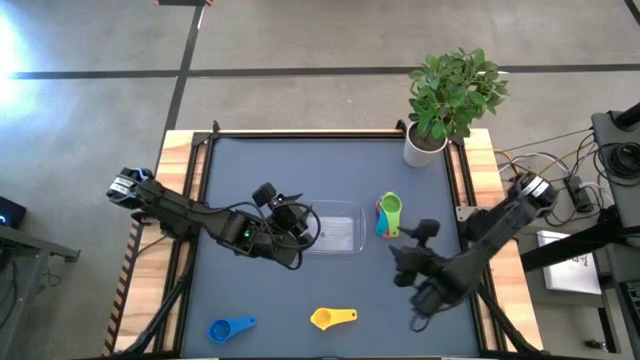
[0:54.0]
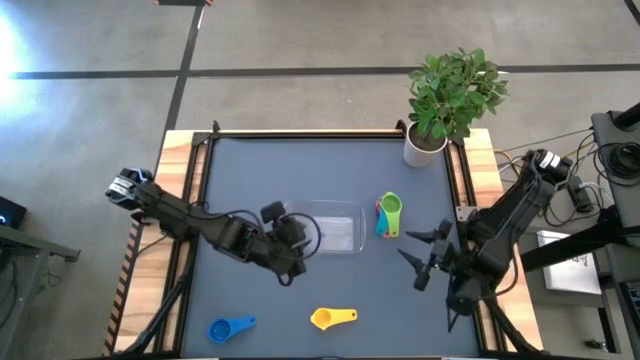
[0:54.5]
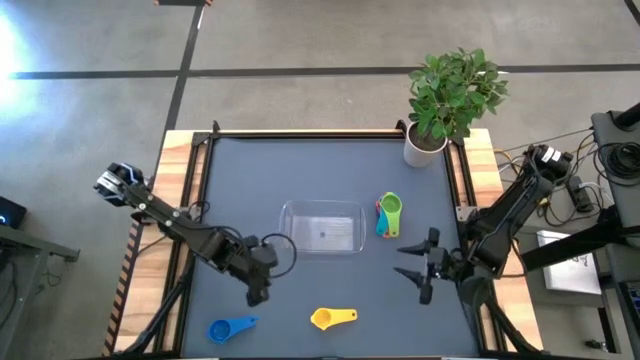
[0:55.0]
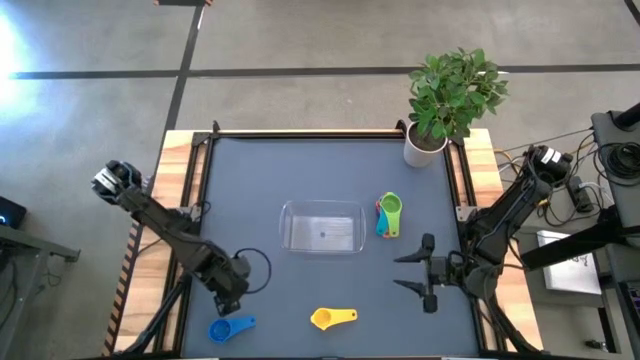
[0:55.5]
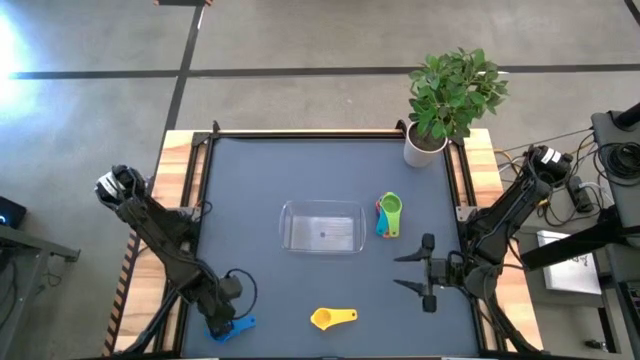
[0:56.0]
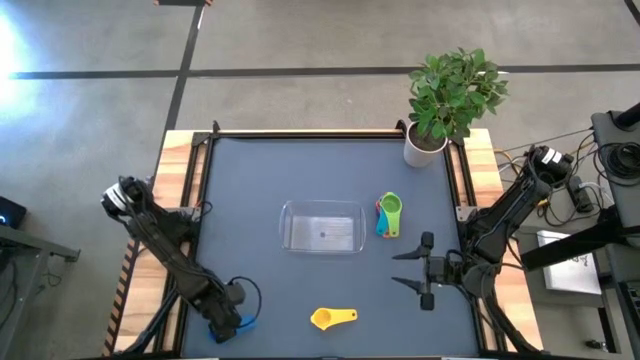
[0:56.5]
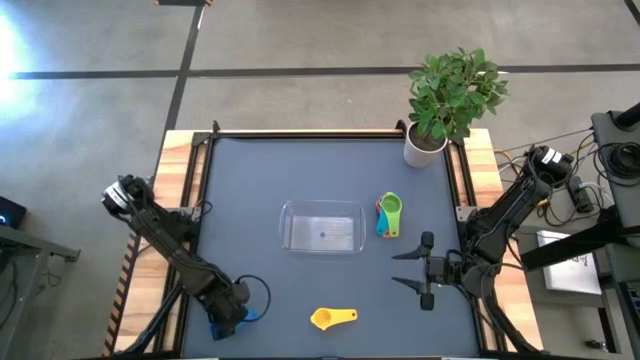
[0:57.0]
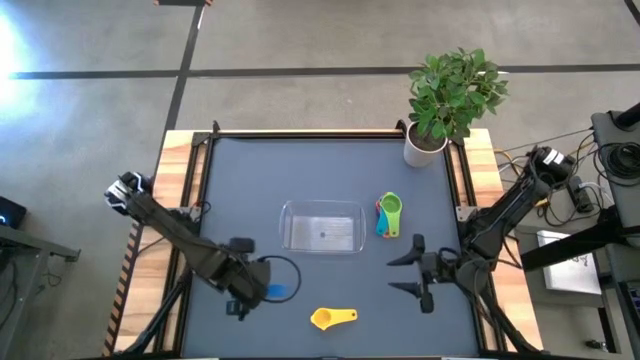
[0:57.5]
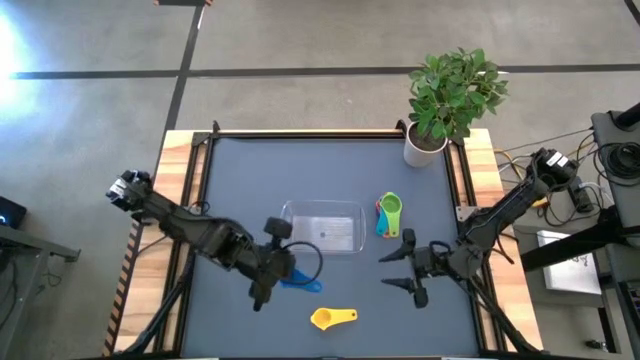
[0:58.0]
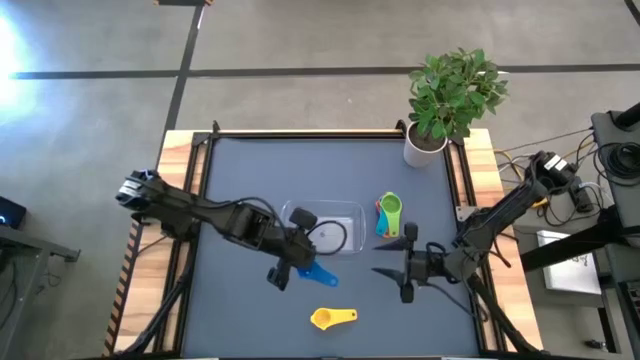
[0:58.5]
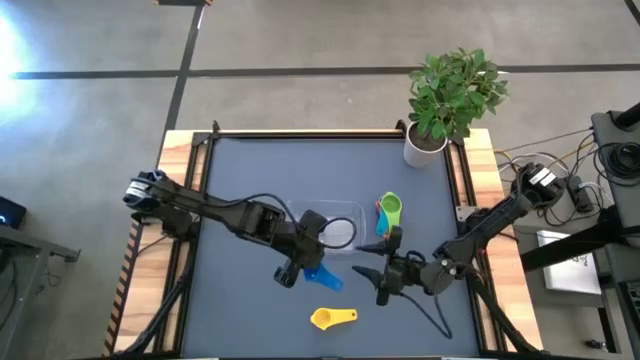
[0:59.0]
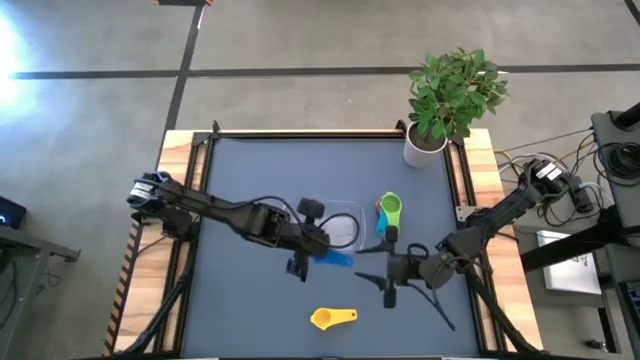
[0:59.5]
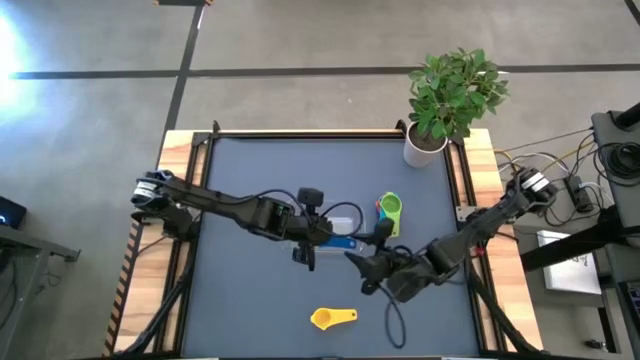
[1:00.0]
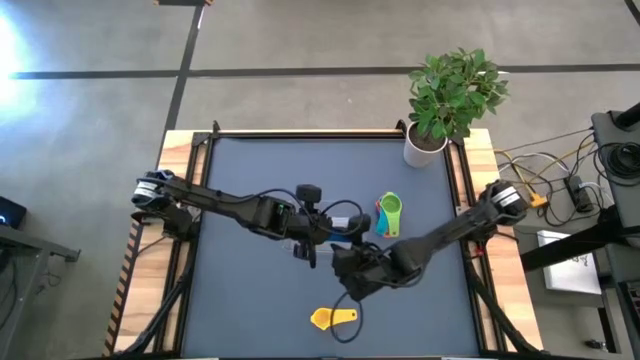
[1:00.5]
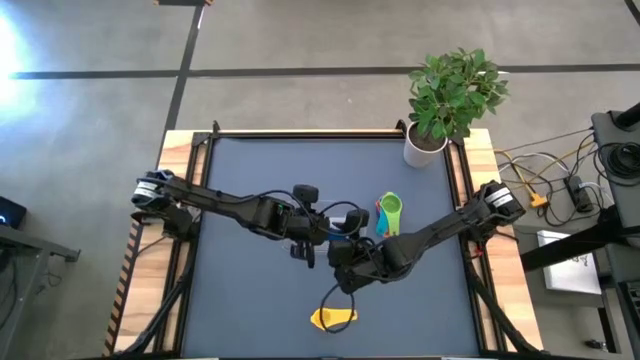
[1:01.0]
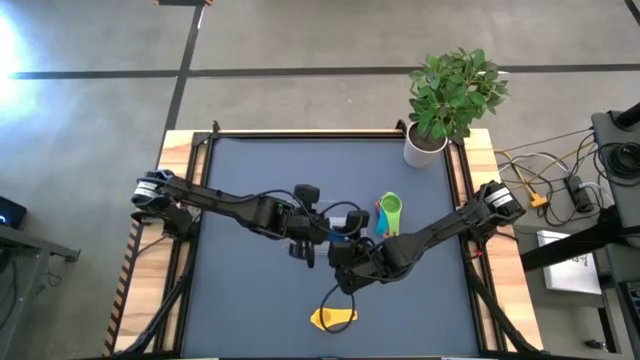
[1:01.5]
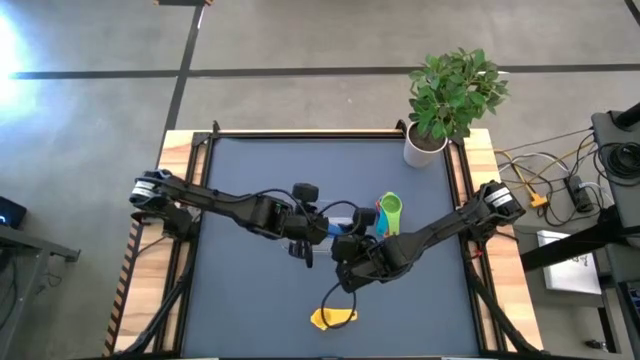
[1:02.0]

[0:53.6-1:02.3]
Task: Nest measuring cups in basket
Stack the blue measuring cup on top of the green measuring cup

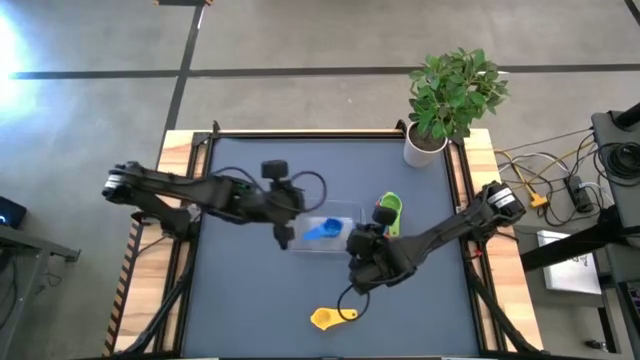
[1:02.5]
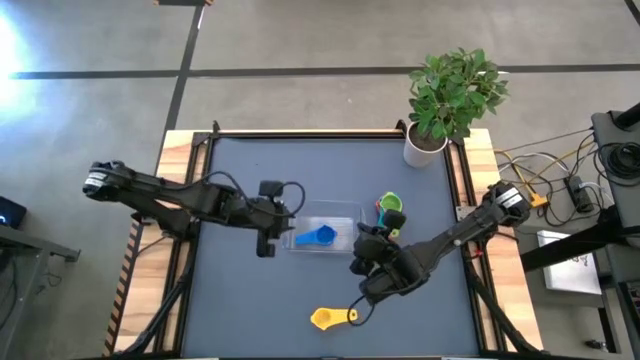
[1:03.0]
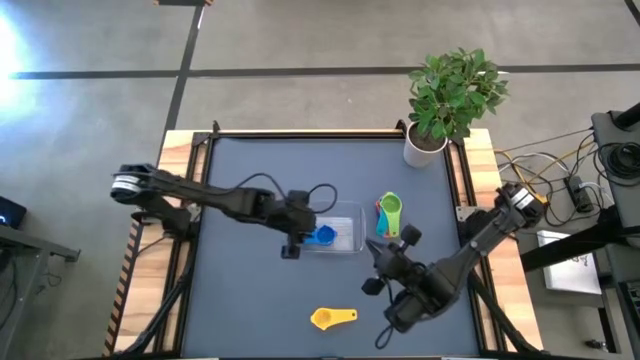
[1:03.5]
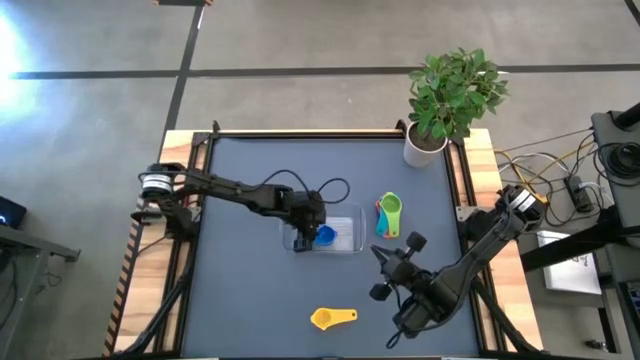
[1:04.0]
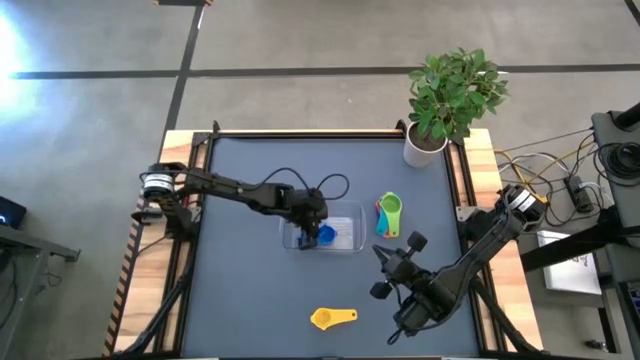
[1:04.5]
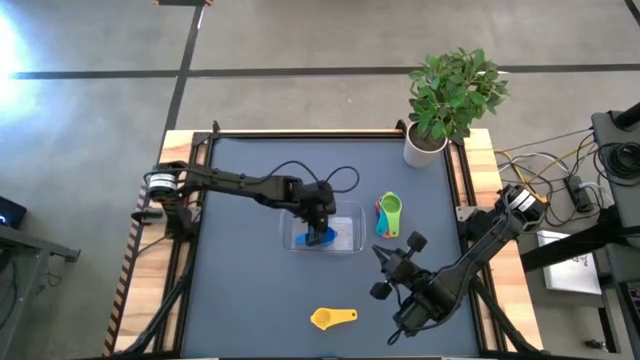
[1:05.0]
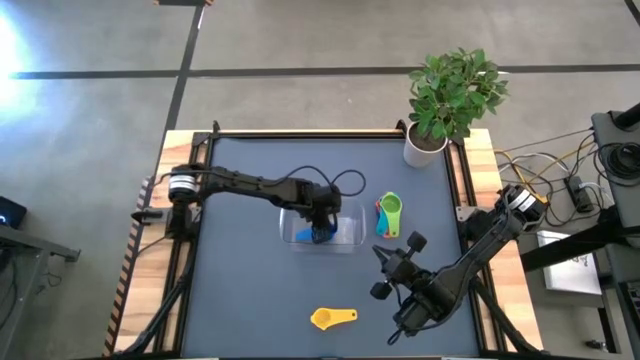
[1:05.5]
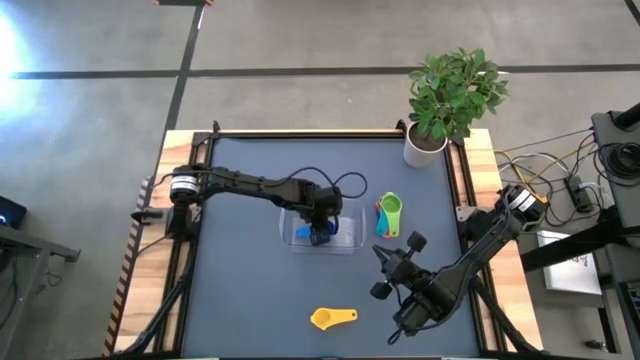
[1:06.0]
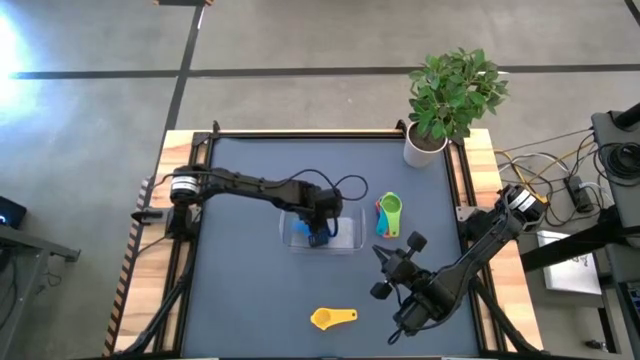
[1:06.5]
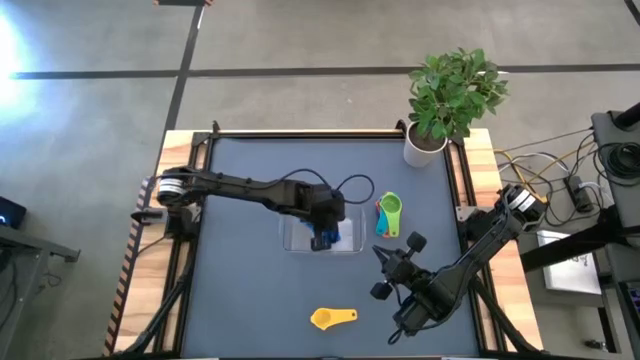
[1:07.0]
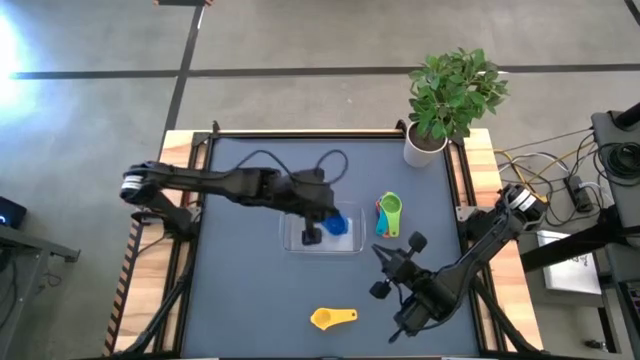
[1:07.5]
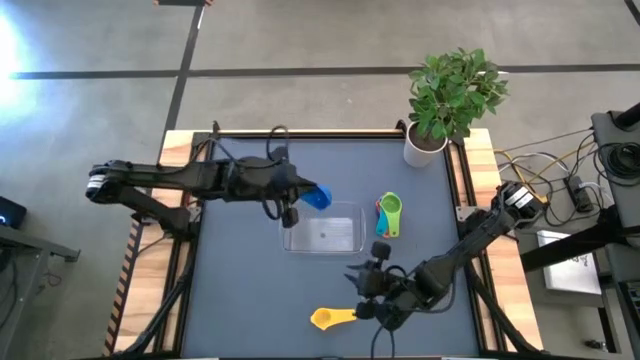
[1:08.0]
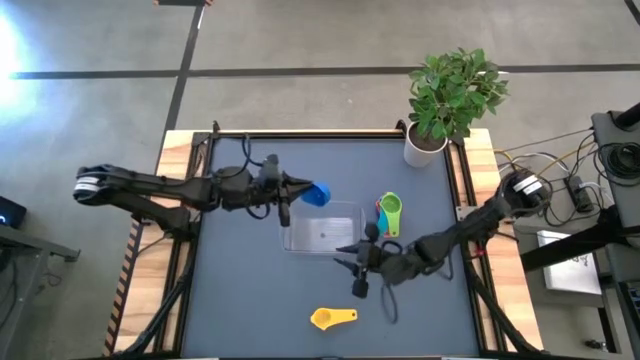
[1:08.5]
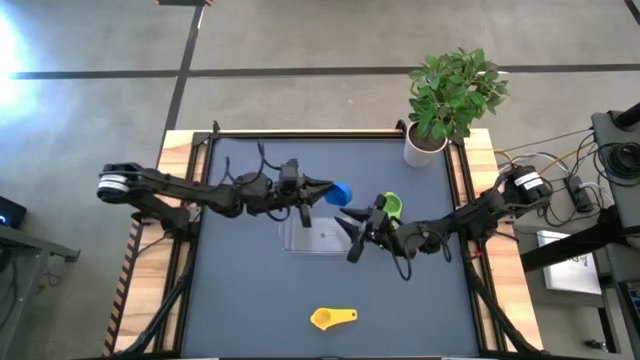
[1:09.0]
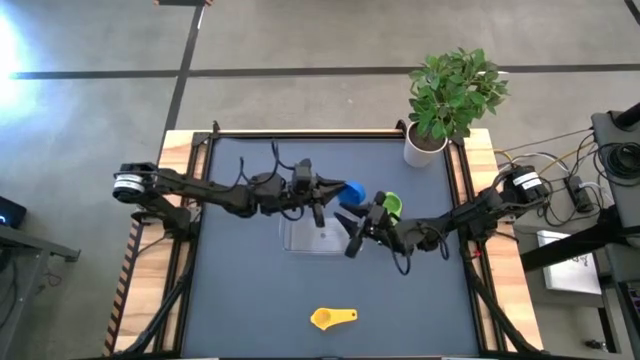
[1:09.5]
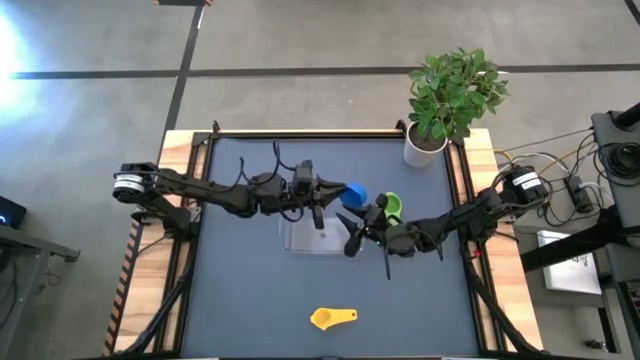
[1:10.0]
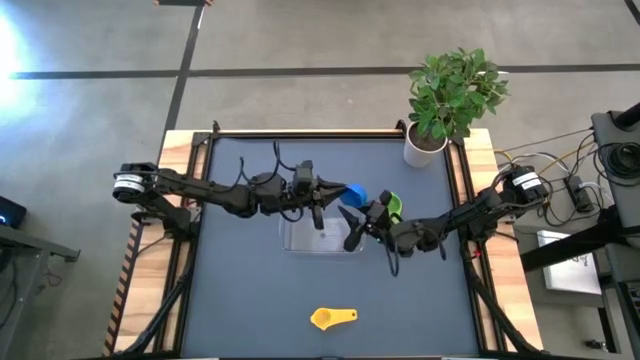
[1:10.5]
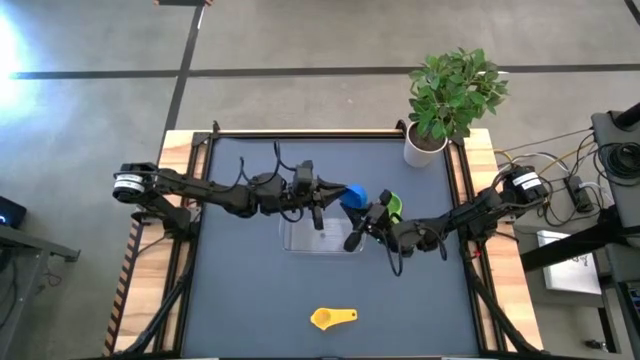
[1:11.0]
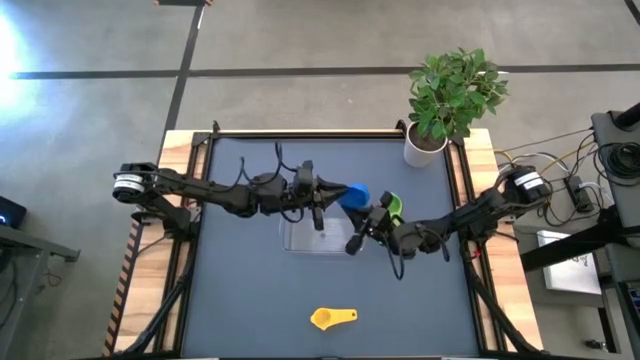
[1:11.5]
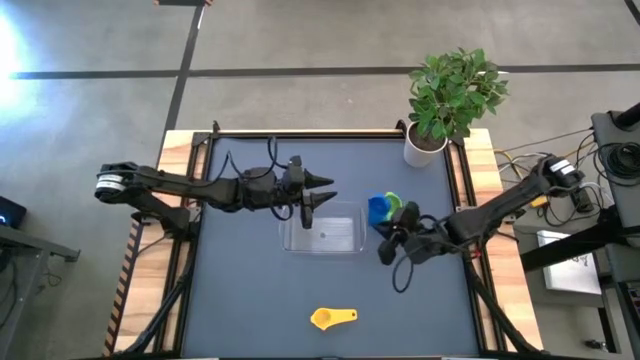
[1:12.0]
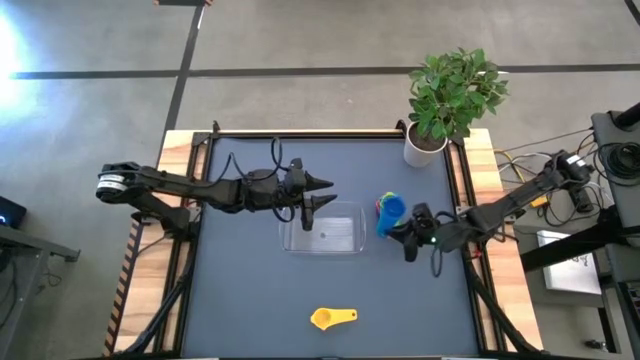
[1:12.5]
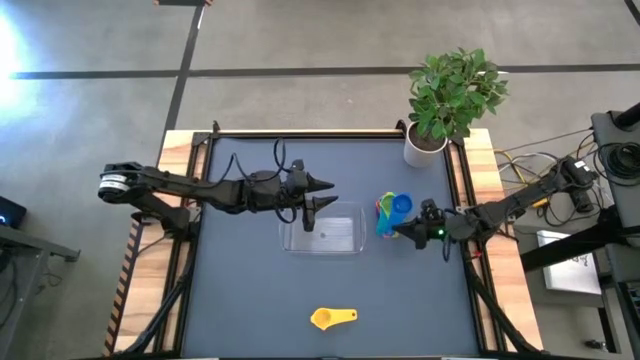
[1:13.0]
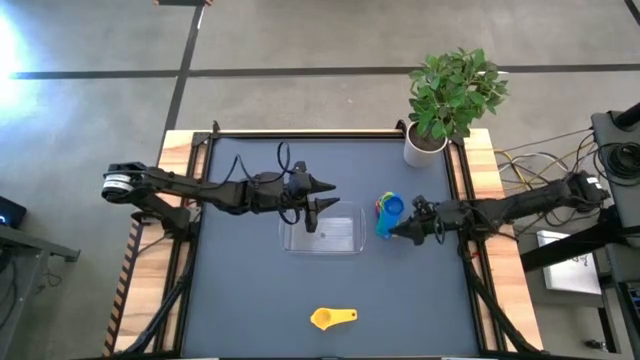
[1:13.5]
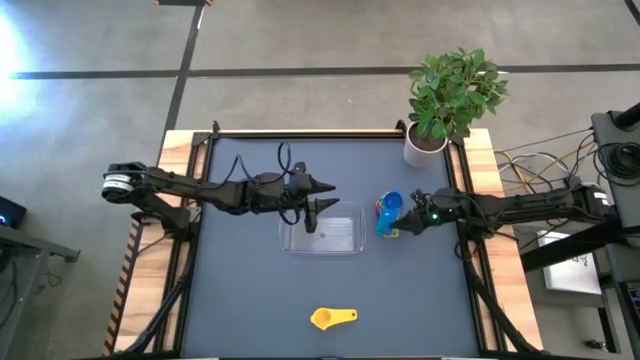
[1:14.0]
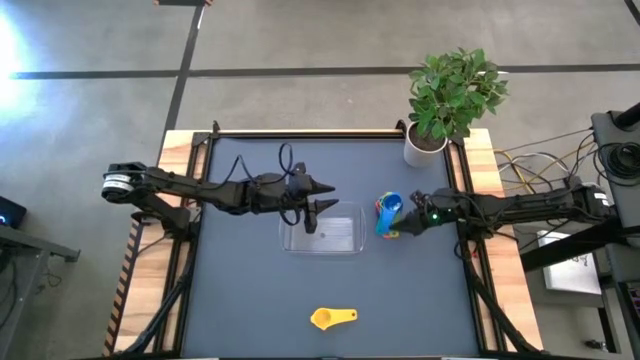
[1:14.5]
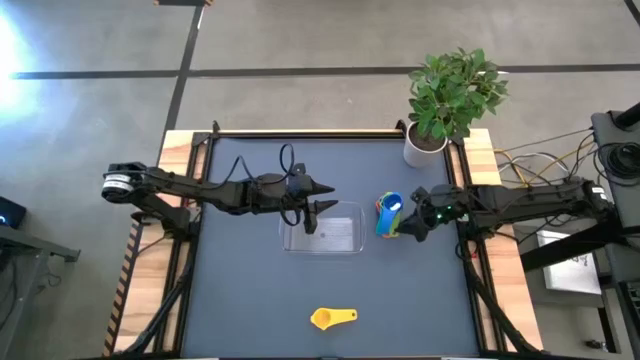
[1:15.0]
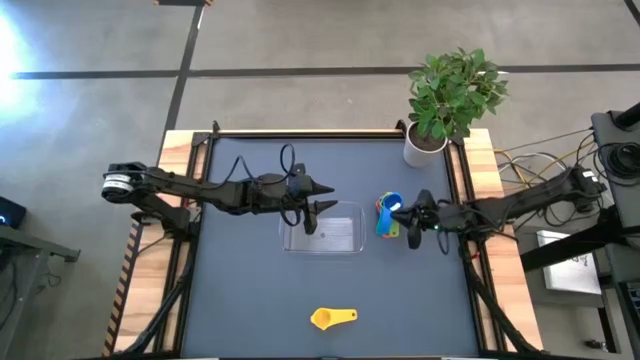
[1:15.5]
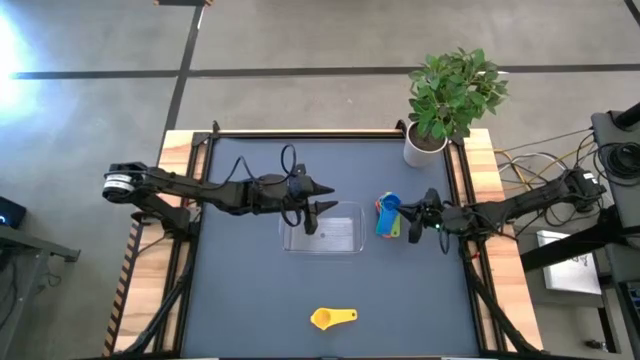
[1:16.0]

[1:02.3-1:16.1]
Stack the blue measuring cup on top of the green measuring cup
